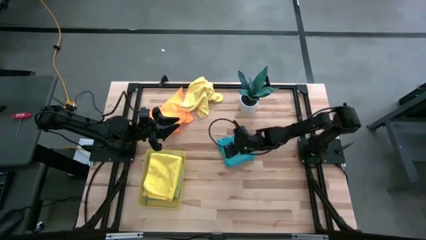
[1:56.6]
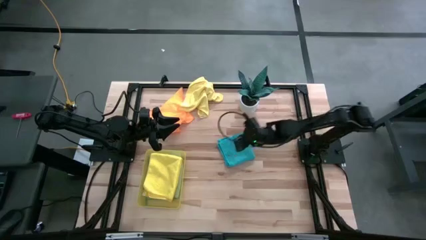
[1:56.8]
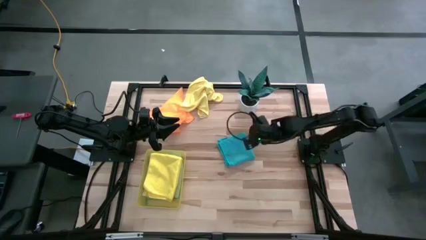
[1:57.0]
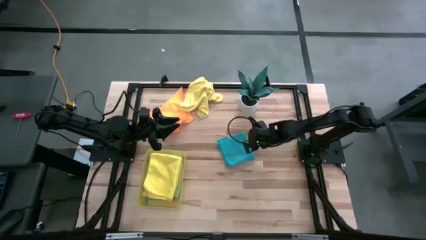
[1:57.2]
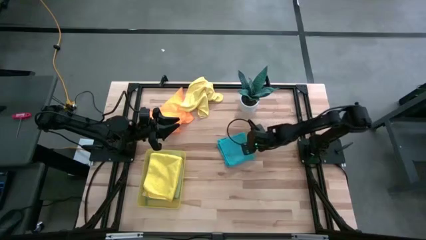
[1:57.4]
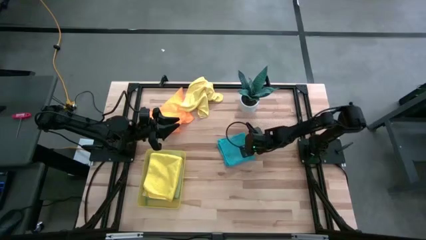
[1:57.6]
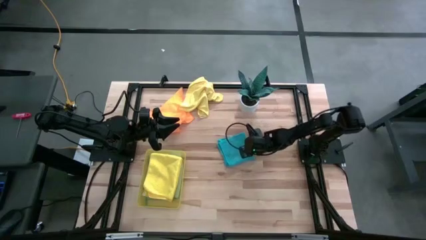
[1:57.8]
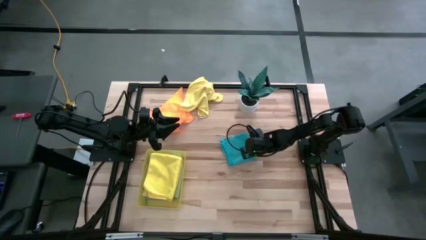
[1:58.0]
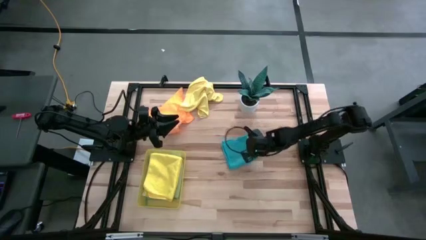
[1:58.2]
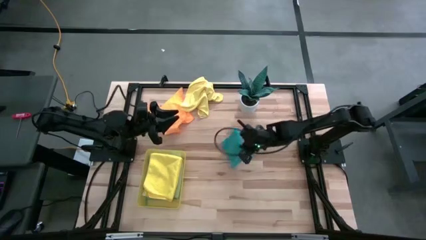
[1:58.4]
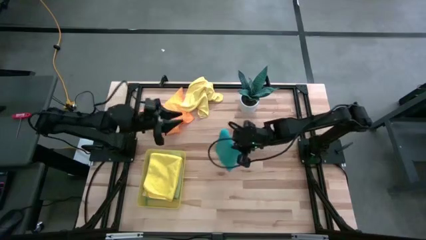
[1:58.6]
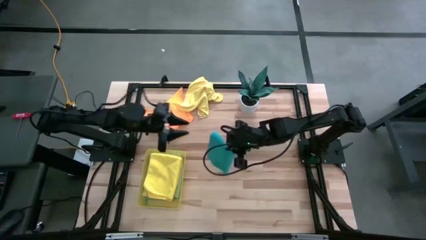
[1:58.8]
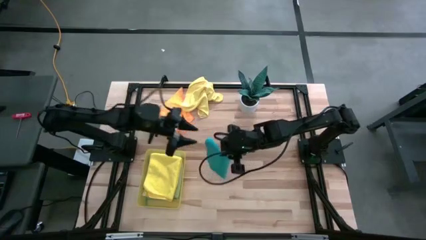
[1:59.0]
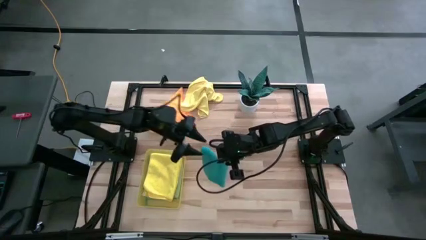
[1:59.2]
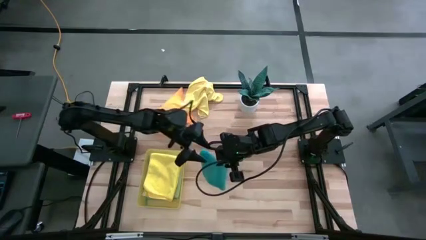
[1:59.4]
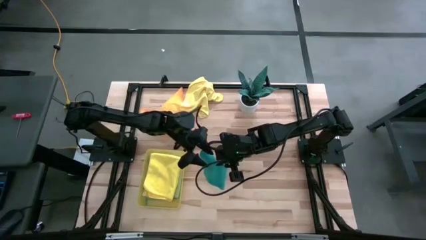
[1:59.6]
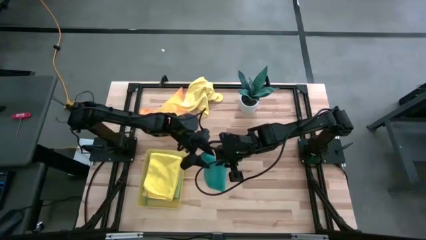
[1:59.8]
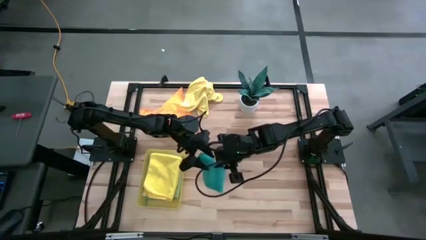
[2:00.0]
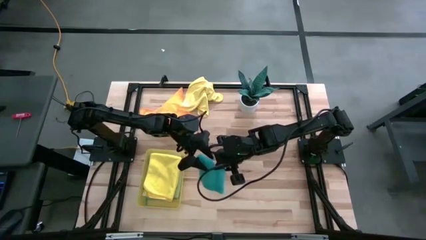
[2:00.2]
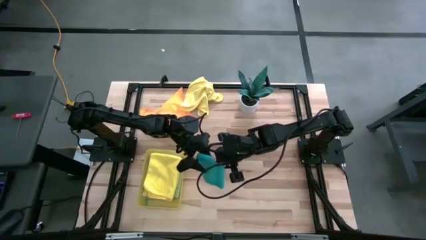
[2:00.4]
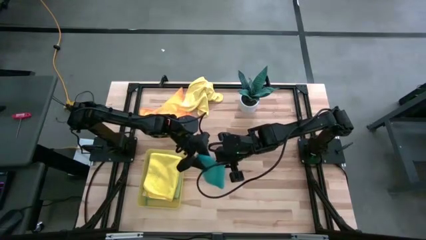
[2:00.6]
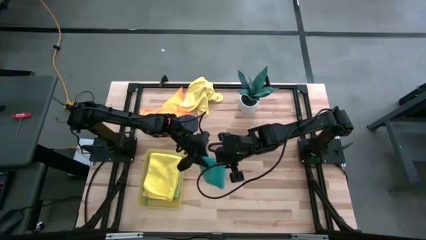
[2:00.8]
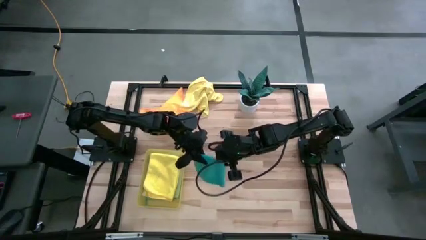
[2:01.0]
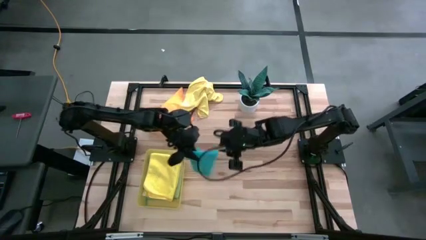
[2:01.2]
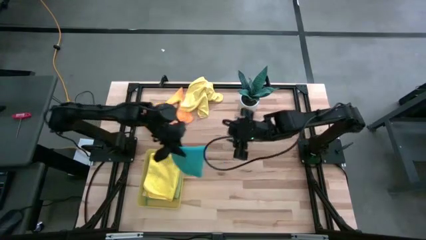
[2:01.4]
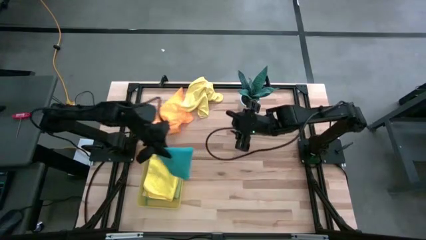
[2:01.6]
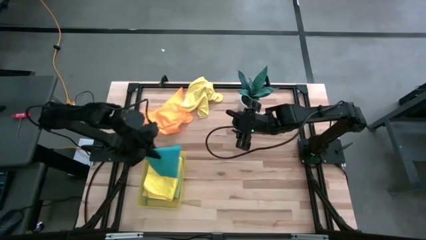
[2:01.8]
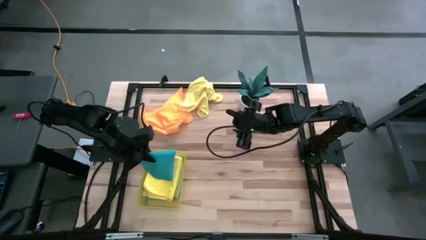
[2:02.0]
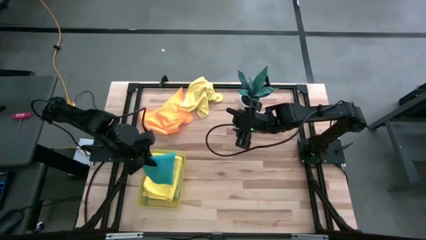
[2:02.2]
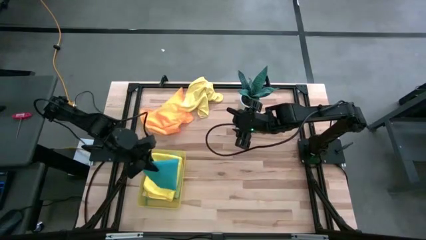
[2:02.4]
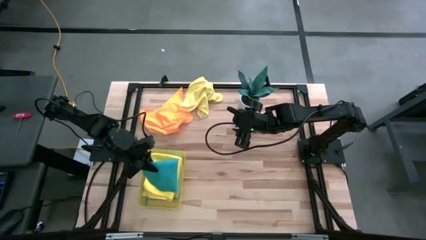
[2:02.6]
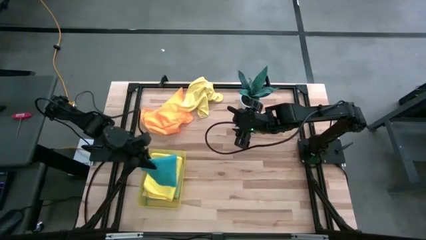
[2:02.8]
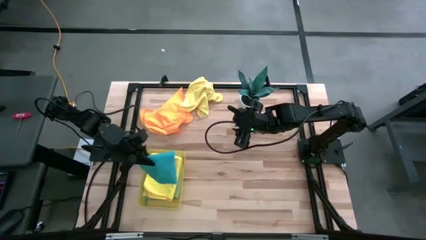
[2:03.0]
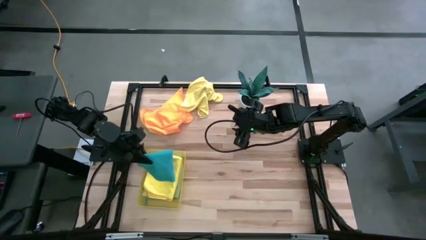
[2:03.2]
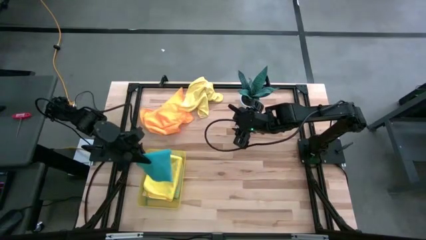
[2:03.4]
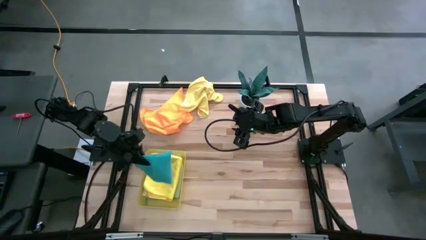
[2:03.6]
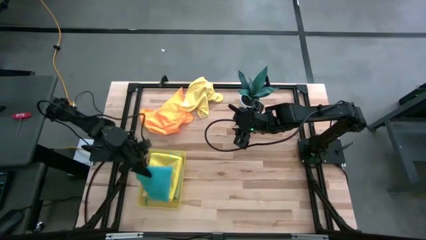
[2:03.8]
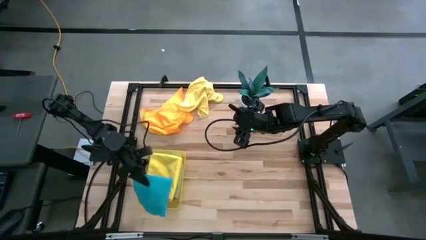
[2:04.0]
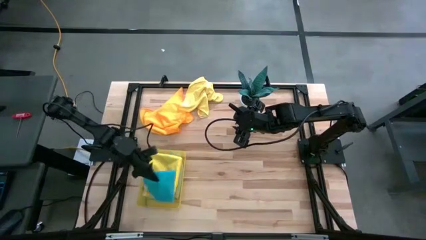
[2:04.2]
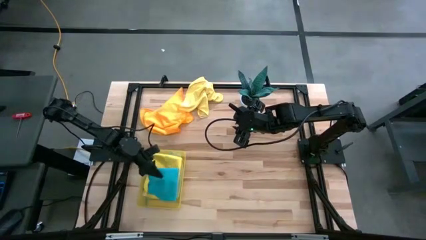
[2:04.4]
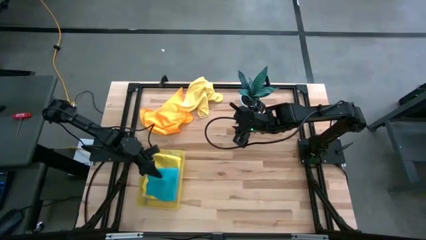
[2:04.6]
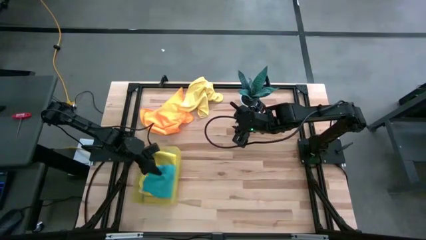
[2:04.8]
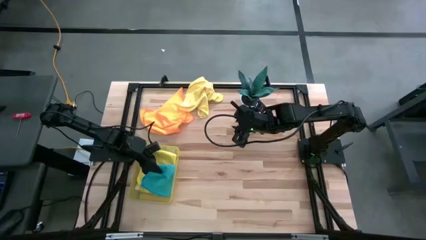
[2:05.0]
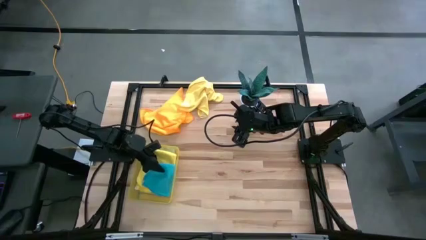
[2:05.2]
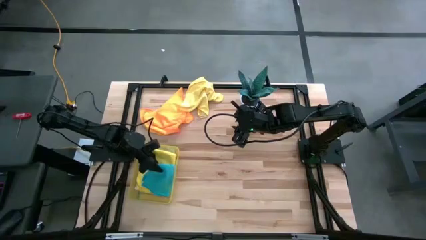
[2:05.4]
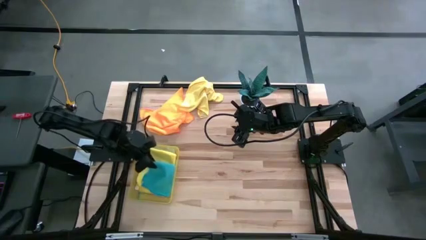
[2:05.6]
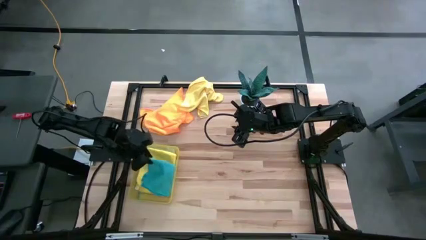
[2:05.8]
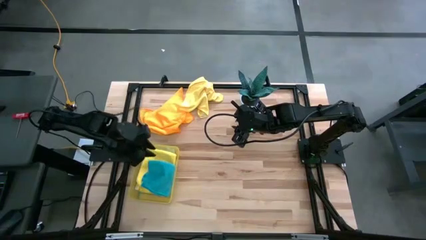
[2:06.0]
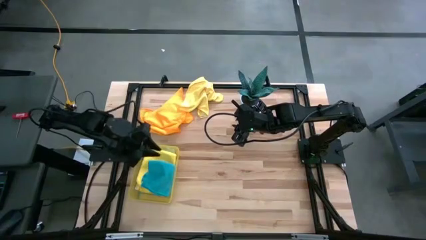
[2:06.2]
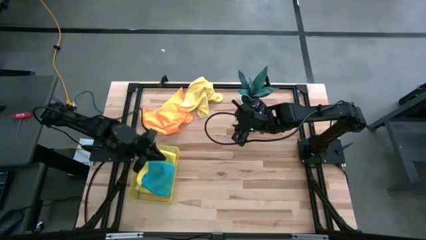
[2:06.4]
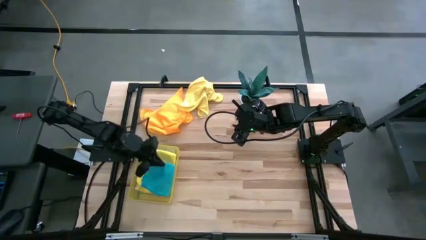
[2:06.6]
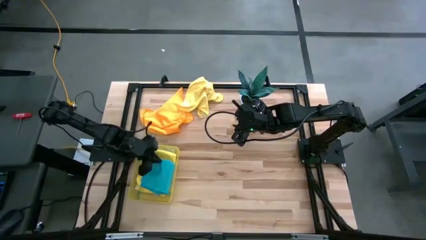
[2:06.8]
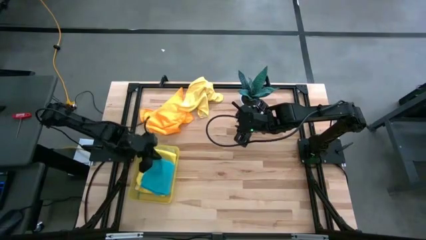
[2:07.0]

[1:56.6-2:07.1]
Task: Fold microfiber towels
Stack the blue microfiber cloth on top of the yellow microfiber cloth

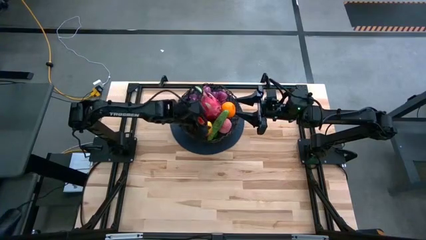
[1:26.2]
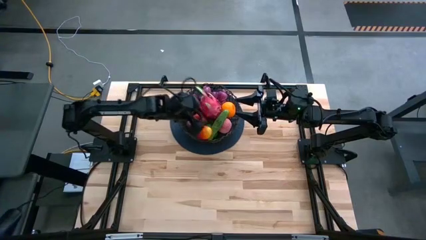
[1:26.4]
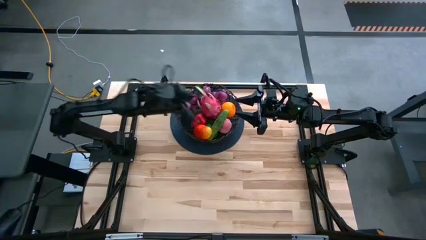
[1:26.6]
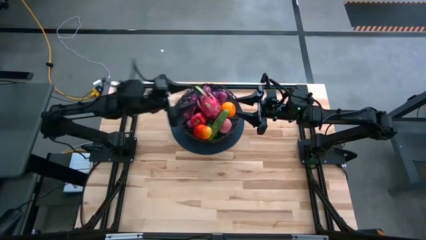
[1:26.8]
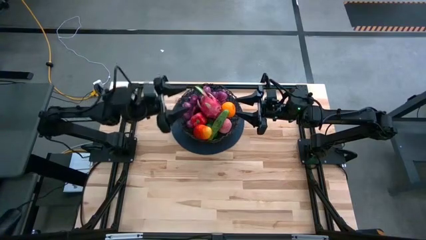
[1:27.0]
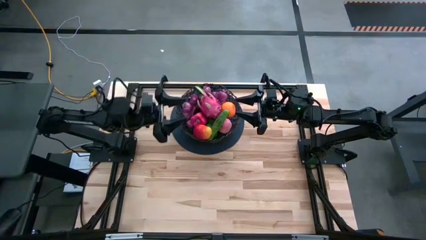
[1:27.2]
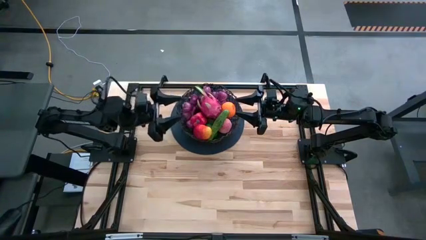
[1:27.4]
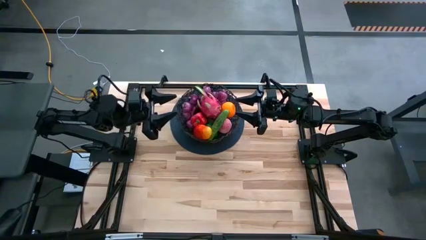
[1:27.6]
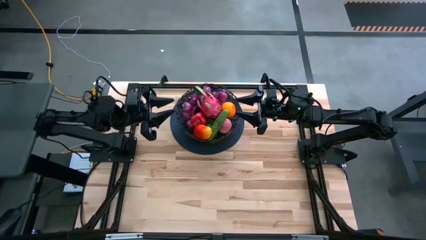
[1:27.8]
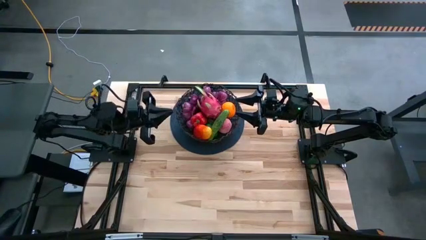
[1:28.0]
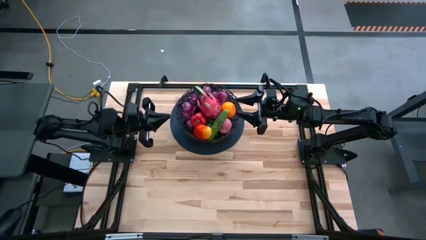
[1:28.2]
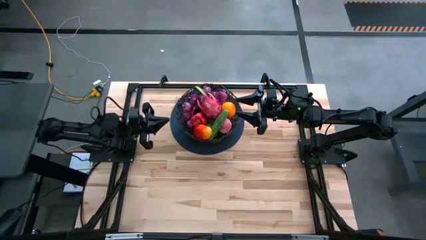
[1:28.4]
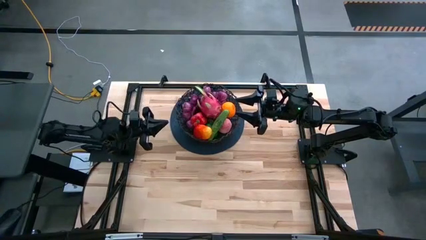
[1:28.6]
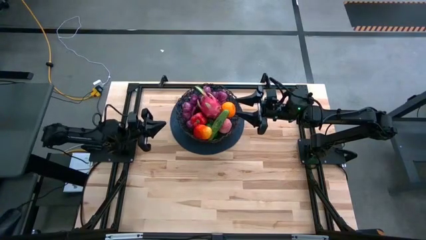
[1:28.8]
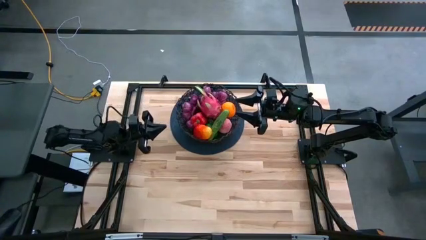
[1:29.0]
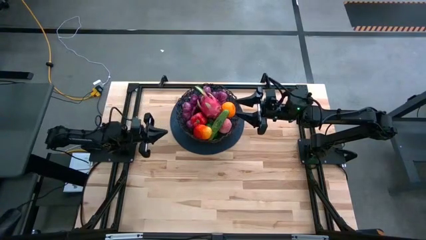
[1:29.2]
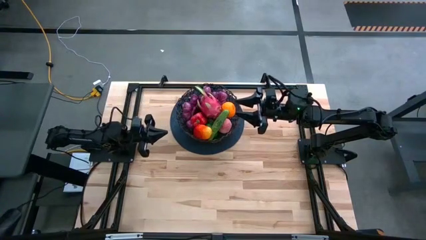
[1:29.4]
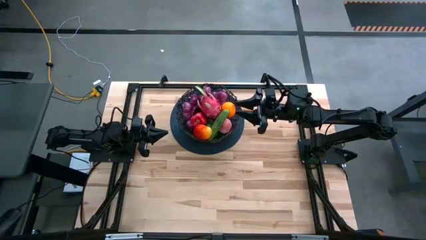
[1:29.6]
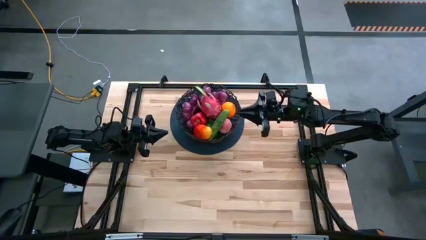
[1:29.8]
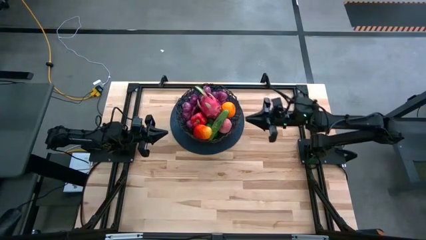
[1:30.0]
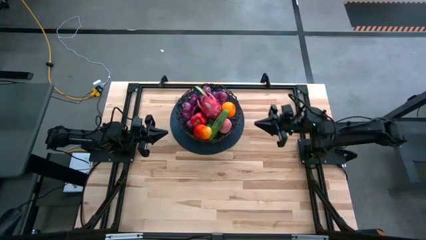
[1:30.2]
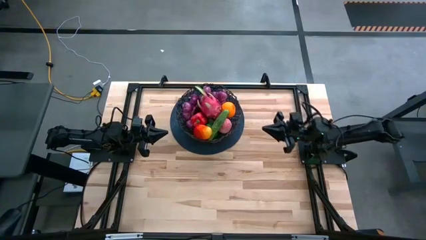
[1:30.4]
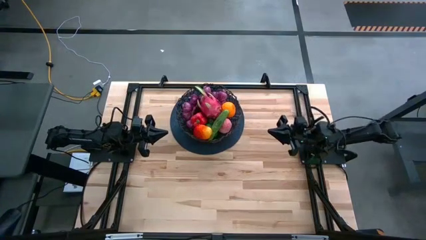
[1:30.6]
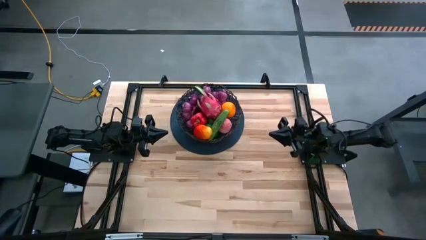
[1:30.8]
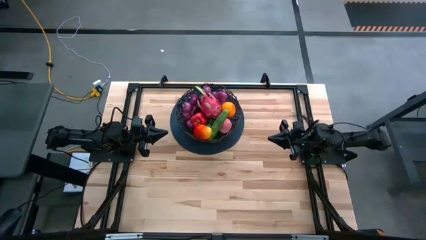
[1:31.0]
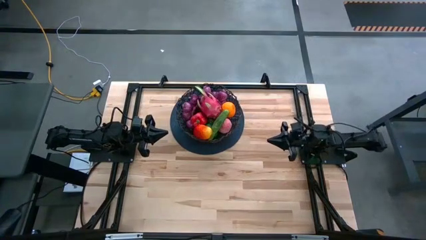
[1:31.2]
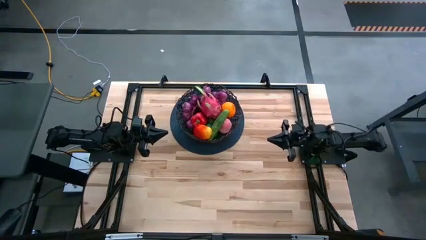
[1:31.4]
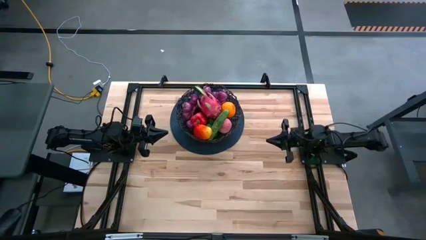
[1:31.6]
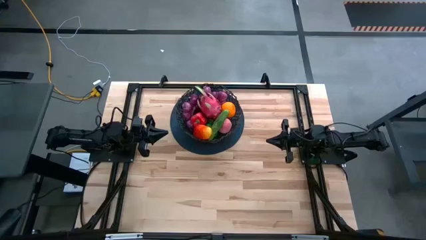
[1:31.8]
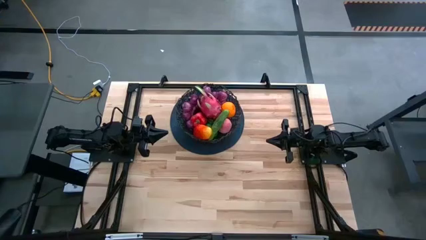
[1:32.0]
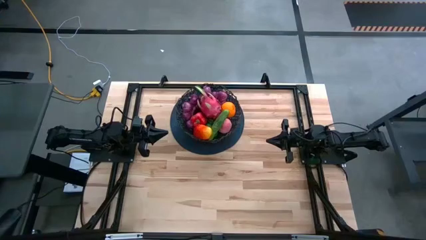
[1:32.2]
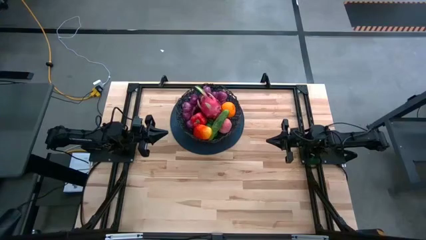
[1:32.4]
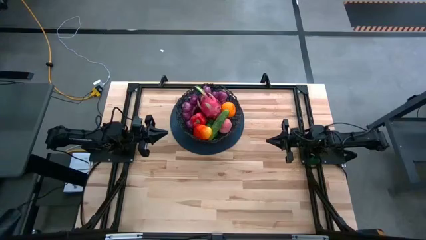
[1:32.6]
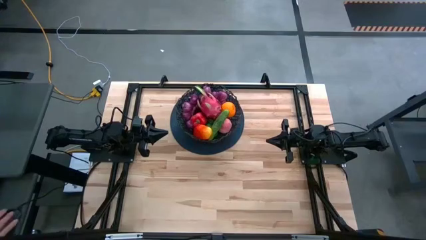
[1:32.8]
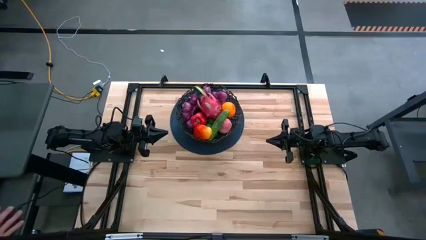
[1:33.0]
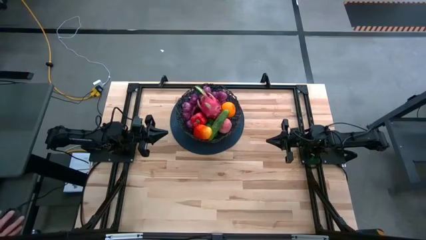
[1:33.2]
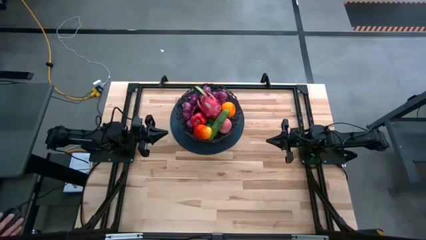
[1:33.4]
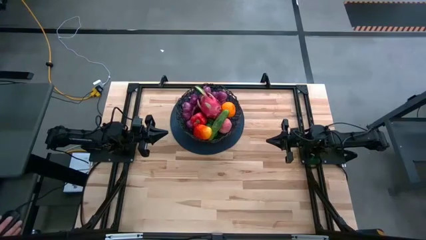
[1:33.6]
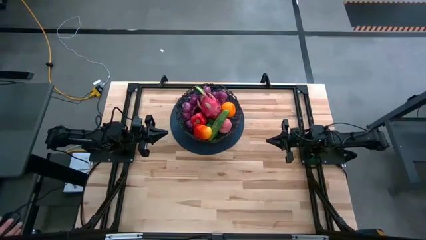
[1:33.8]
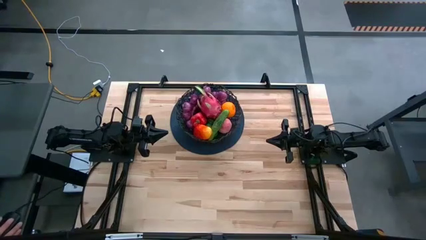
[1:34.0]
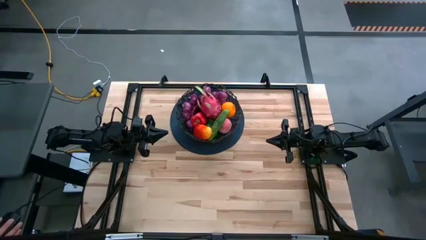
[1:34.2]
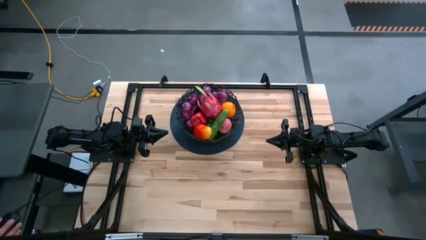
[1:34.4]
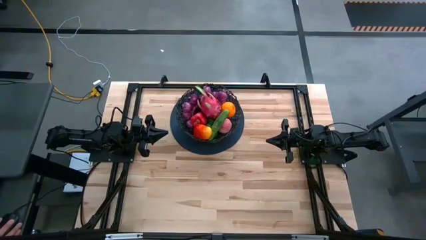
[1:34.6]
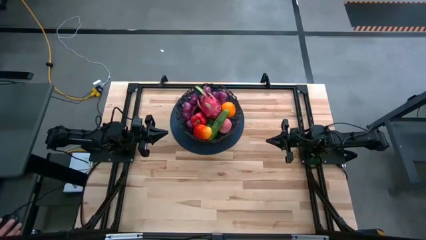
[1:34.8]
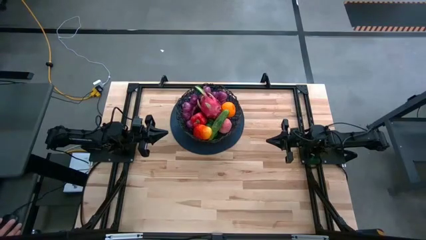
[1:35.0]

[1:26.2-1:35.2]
Task: Build produce basket
Return to Home Position
